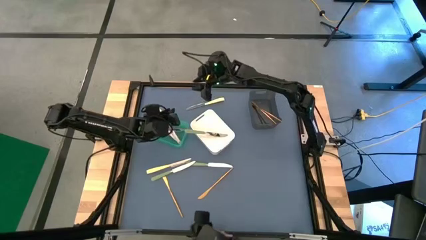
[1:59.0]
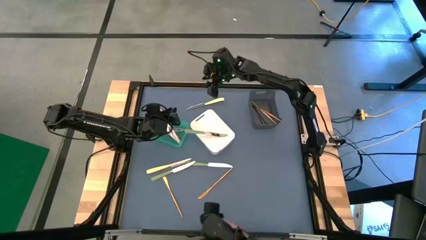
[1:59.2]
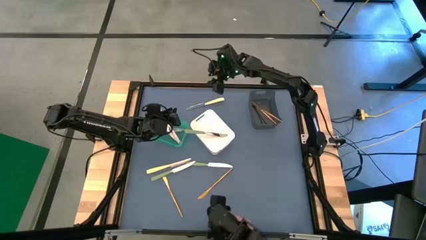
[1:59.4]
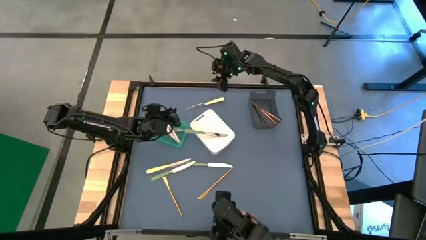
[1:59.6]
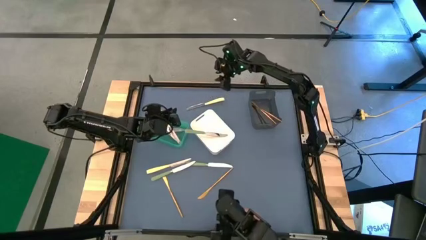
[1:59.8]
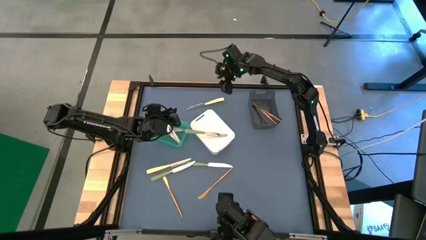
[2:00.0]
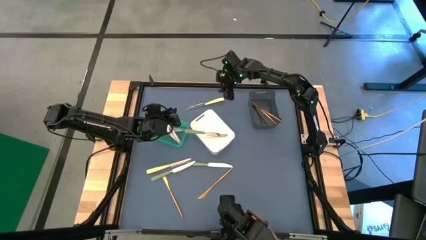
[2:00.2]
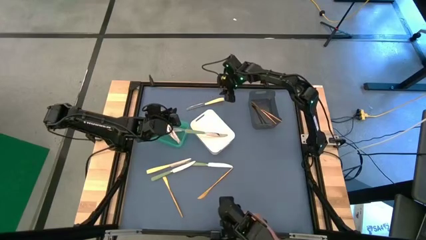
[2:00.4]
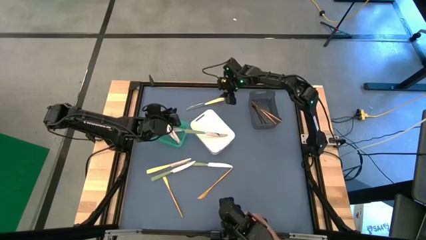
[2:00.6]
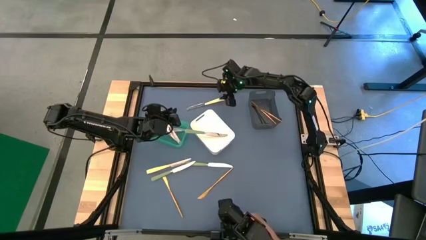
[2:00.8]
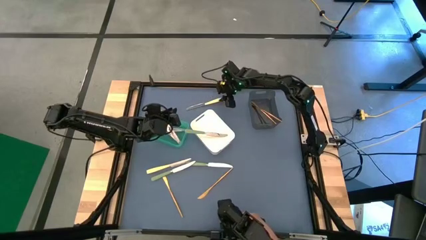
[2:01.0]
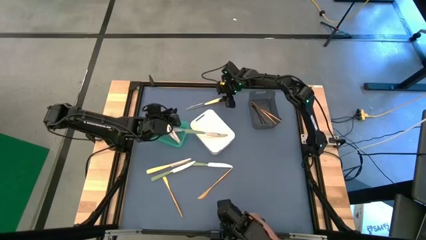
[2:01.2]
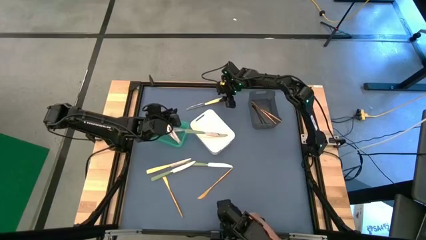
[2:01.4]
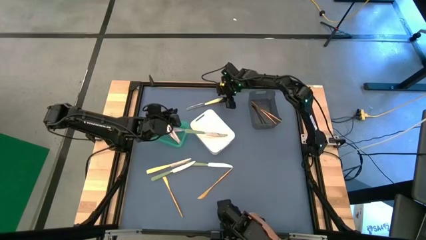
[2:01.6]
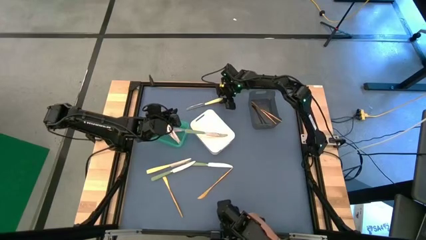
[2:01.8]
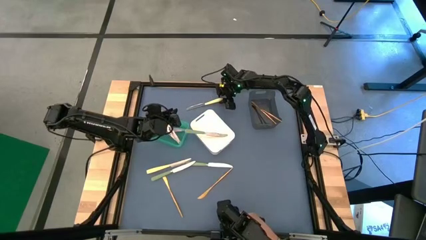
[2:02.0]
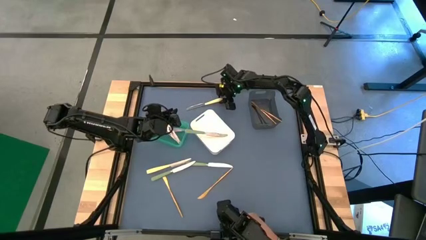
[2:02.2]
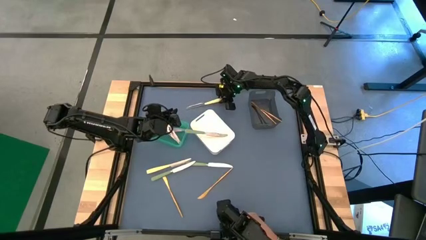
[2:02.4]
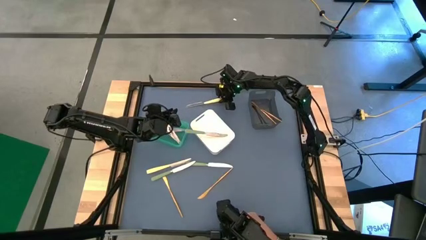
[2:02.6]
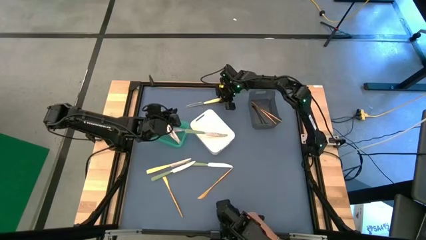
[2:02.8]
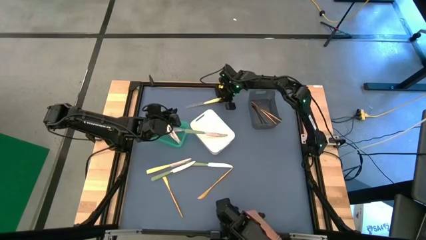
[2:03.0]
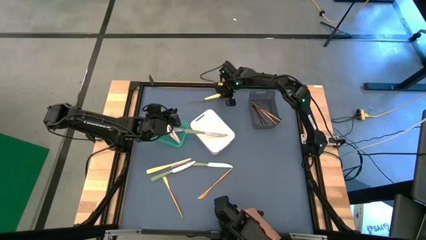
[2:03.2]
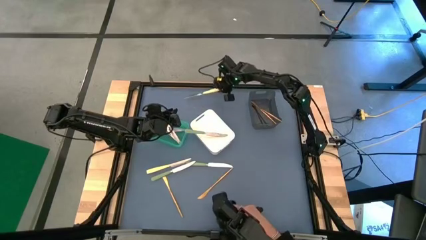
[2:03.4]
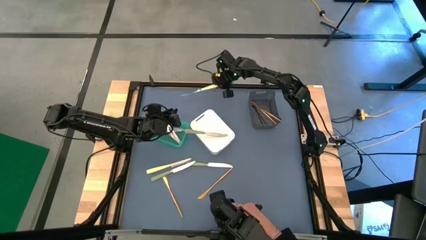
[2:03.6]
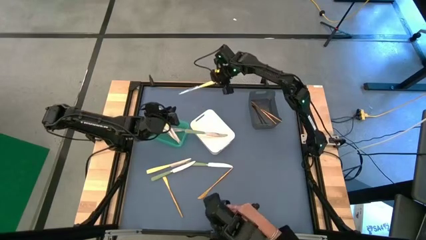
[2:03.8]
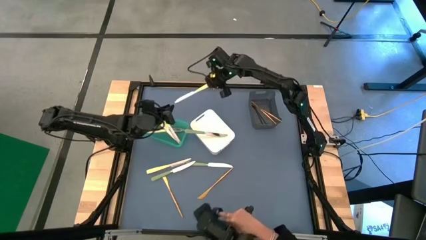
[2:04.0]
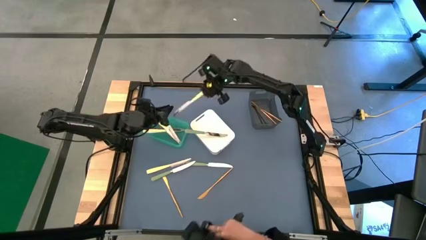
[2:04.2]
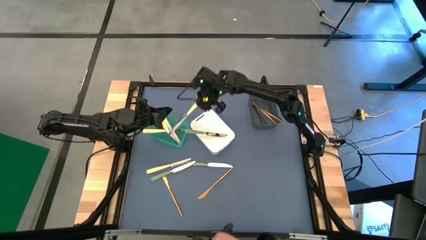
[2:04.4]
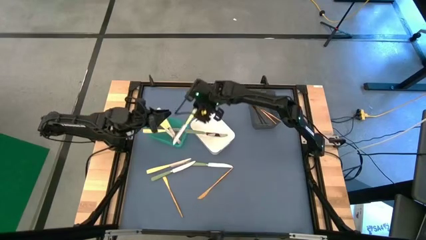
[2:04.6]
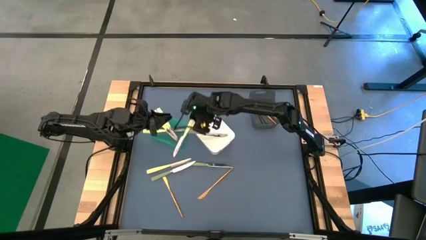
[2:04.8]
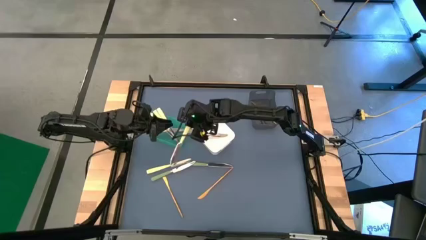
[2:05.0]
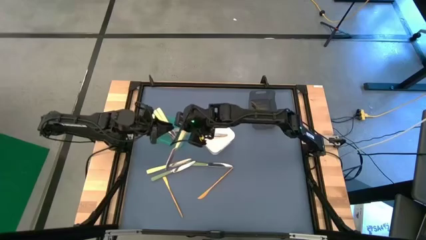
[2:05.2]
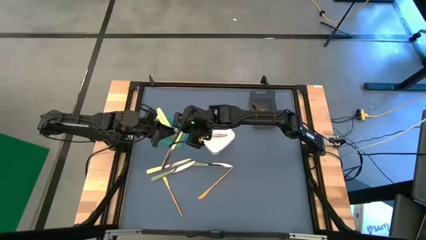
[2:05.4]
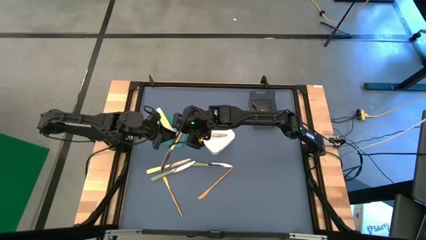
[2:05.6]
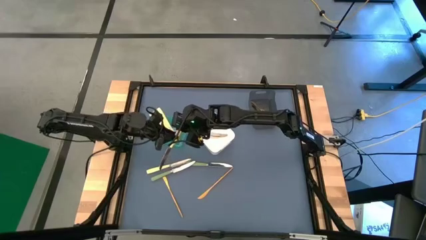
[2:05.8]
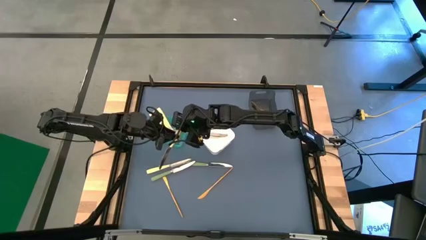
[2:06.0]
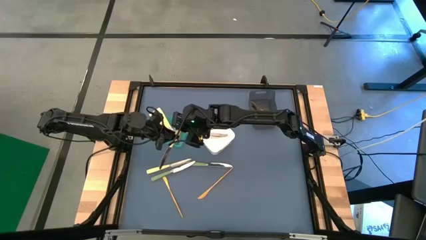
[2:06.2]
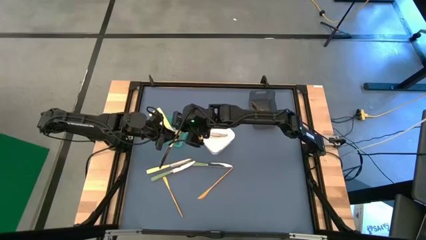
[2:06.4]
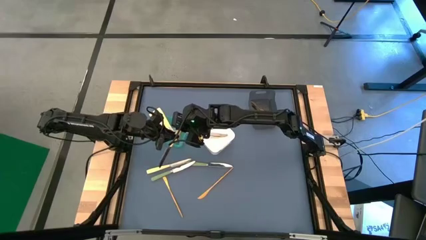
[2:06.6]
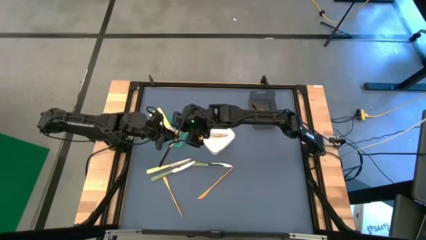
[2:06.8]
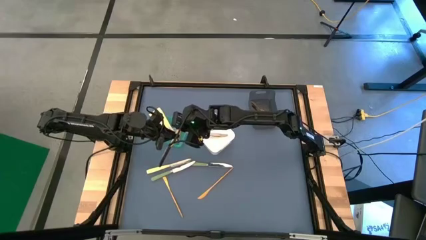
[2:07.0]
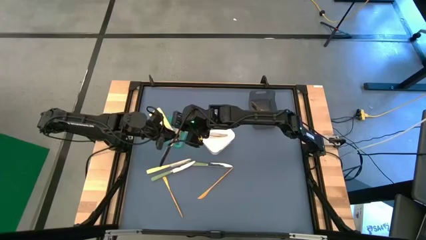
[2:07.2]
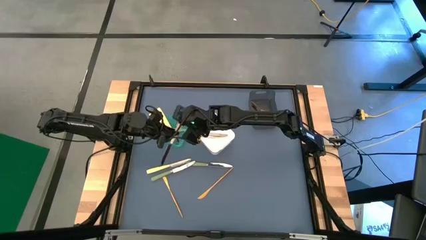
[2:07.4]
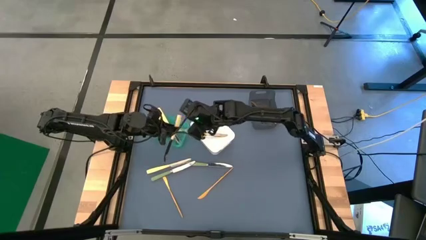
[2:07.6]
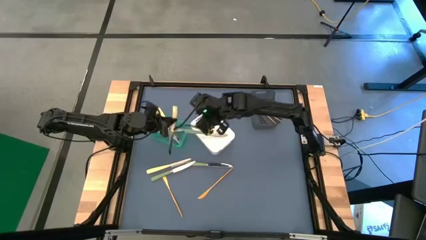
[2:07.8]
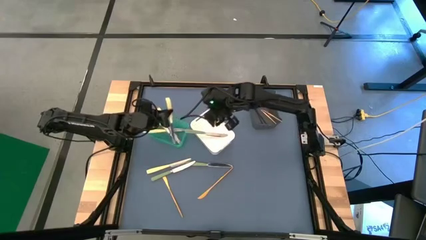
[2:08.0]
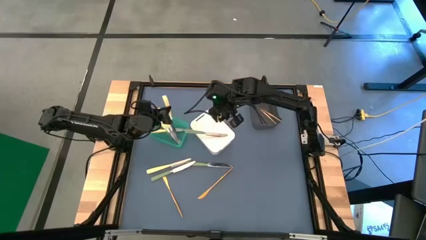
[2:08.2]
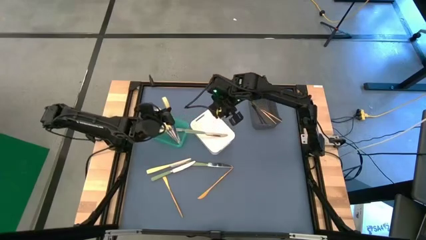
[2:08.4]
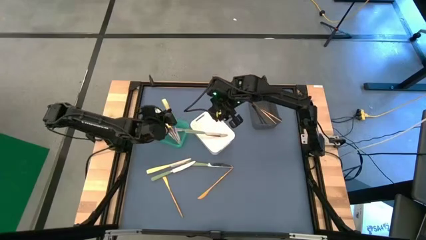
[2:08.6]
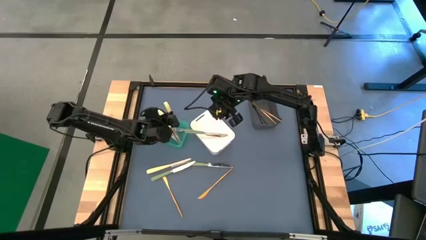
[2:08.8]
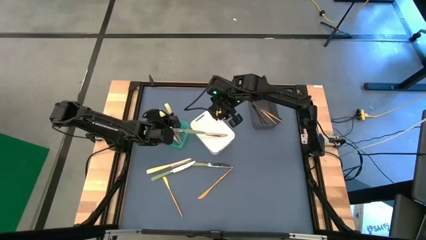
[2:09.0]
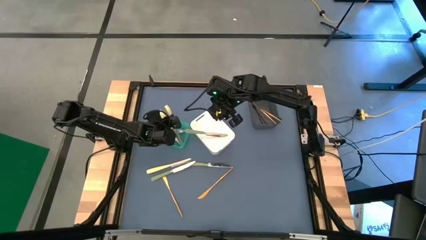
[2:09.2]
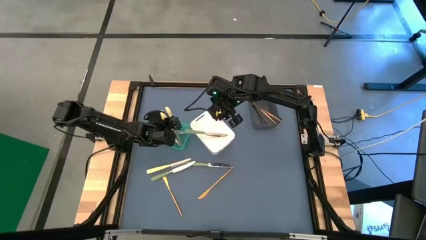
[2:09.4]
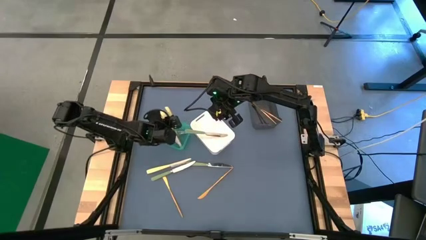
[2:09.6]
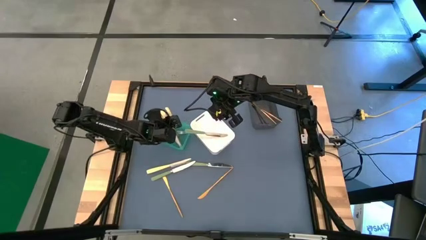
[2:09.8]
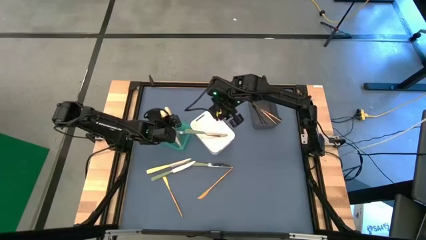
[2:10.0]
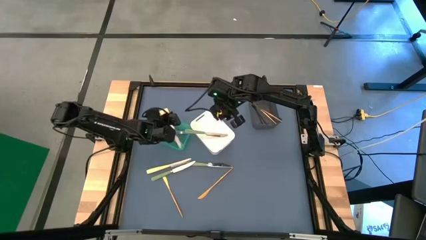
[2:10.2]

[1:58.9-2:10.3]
Task: Sort silverware by color (type)
Put the top yellow table knife into the green bin
